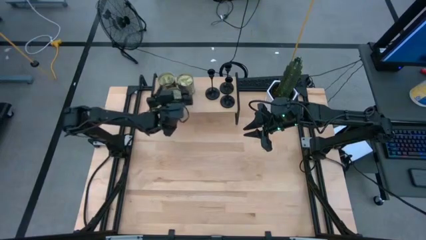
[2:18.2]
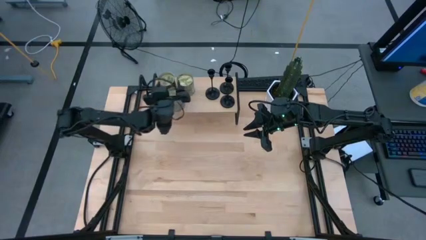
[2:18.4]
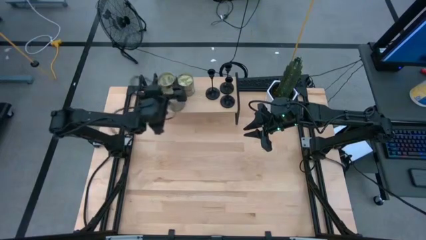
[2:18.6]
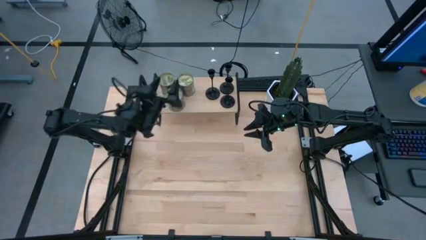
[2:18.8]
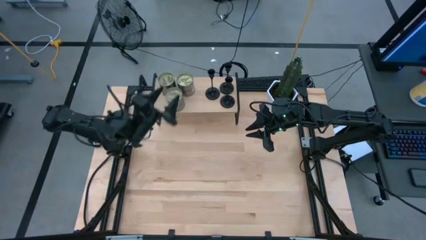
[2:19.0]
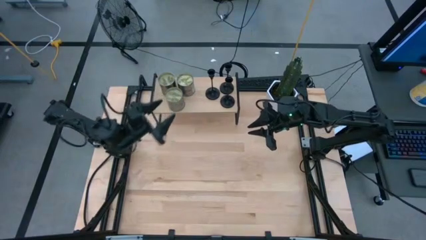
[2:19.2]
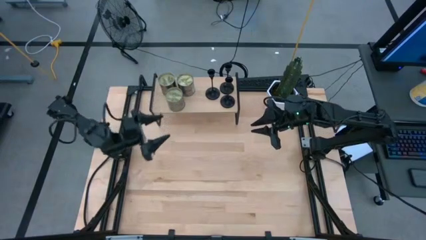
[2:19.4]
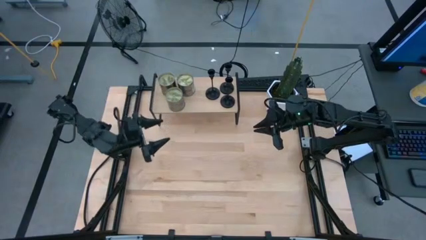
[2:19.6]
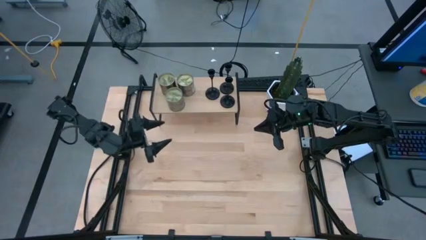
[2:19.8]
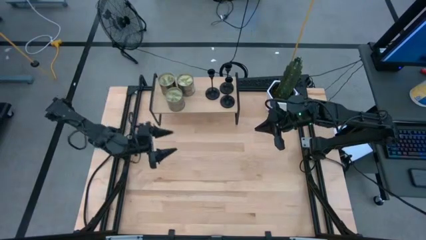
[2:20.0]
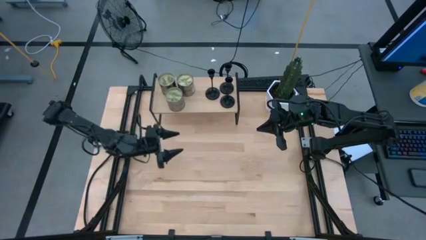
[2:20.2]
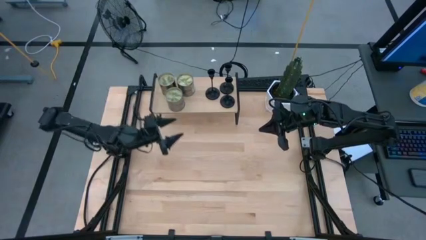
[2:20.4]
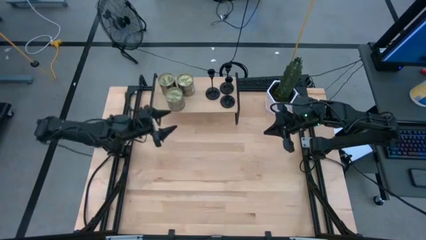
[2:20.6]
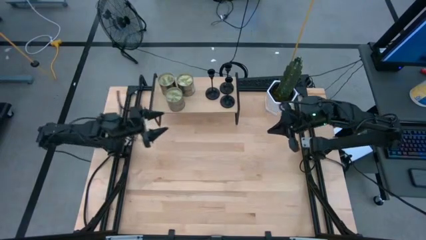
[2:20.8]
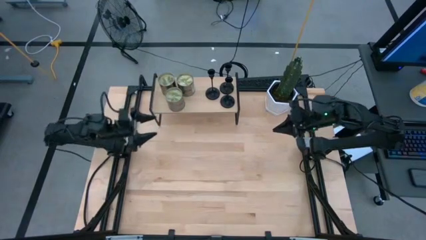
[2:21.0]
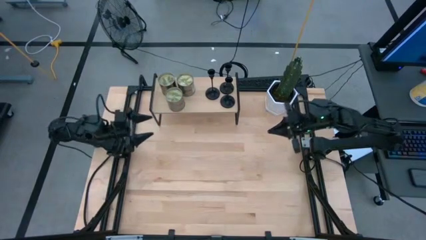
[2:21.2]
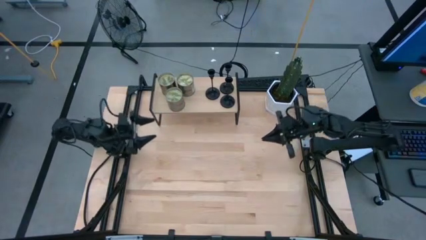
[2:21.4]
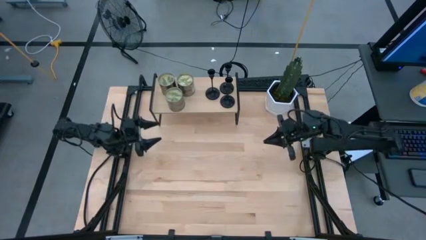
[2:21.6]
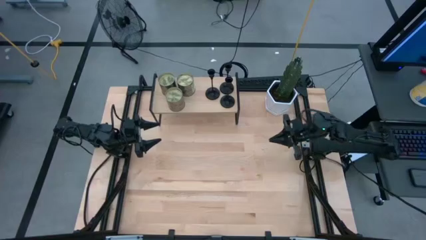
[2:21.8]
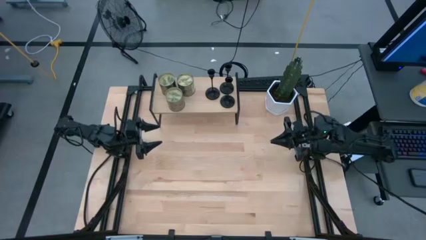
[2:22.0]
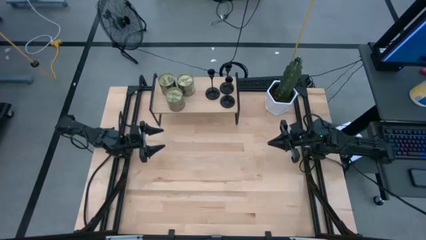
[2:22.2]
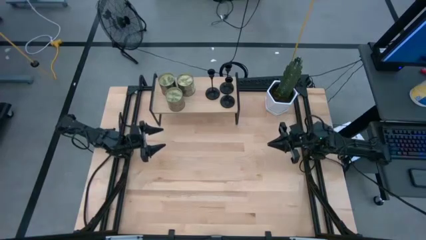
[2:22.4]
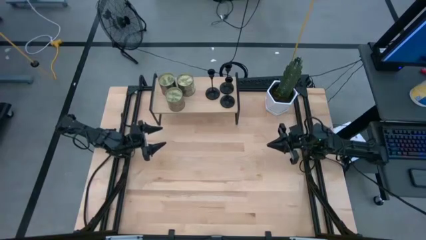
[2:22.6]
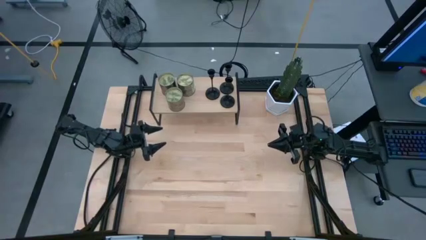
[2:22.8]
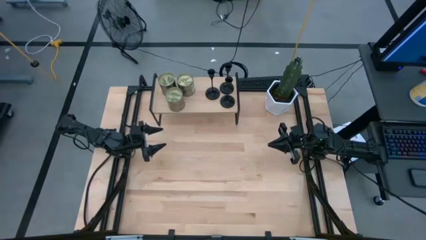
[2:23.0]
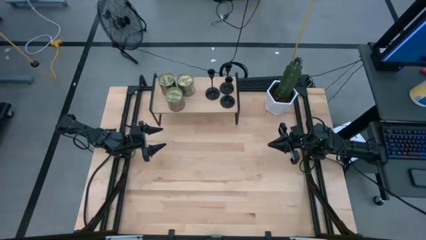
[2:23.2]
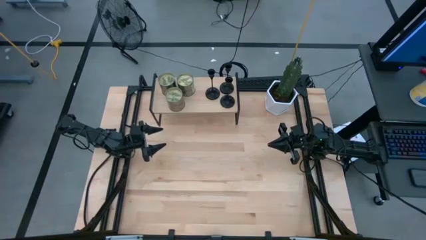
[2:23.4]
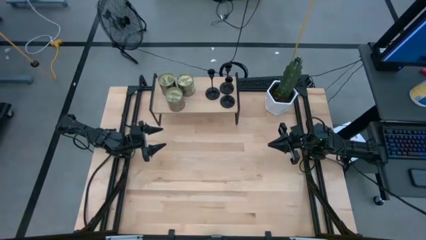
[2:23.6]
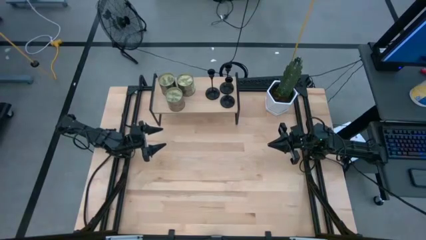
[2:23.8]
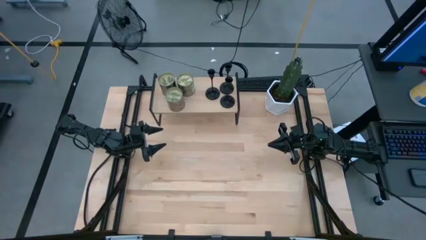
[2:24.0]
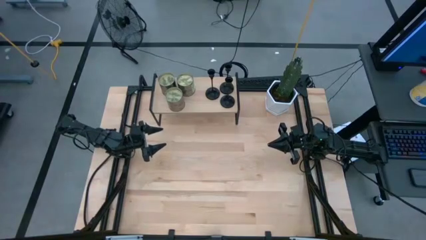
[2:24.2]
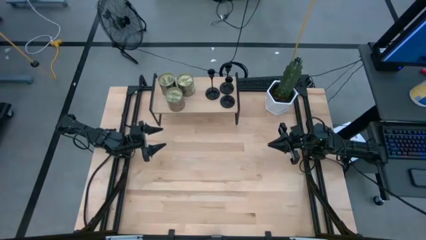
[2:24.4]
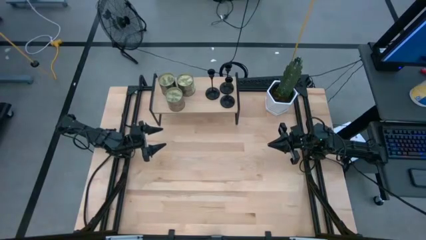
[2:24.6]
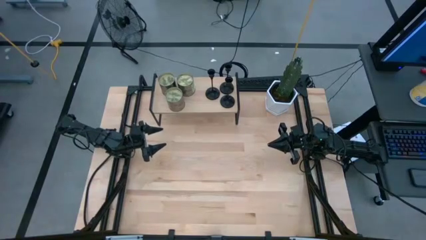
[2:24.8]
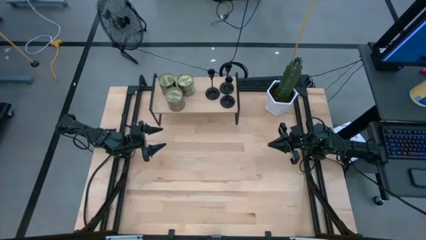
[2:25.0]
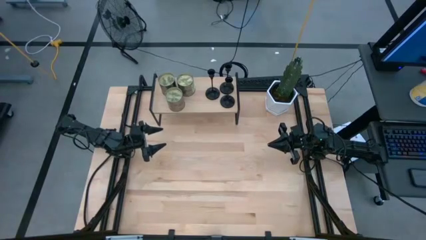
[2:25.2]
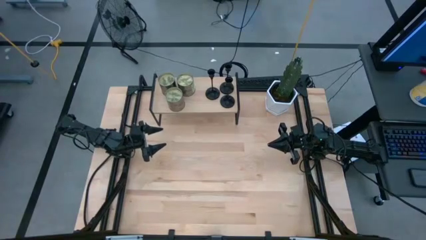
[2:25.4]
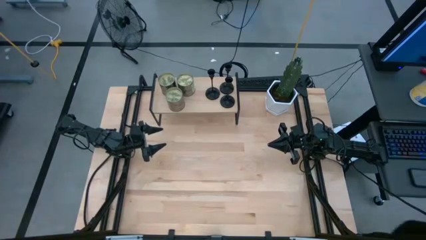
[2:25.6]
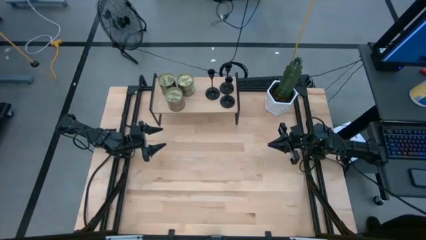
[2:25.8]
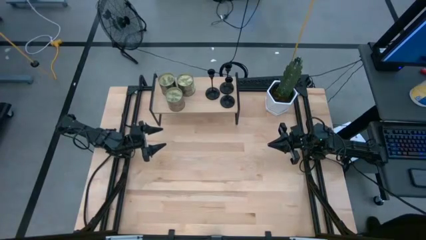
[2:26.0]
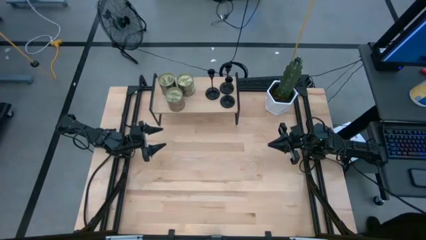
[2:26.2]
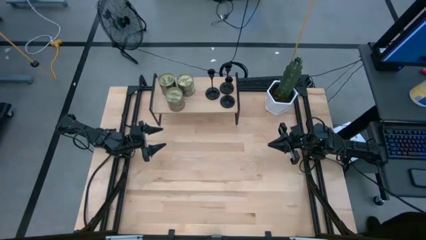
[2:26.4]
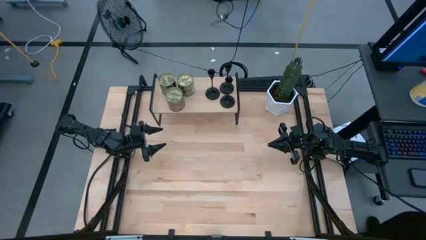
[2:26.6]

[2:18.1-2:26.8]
Task: Pick & Place candle stick holders
Return to Home Position

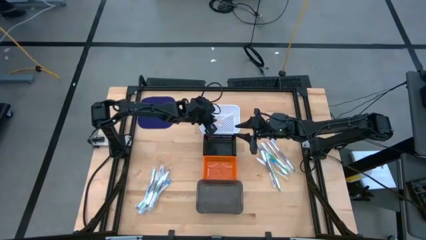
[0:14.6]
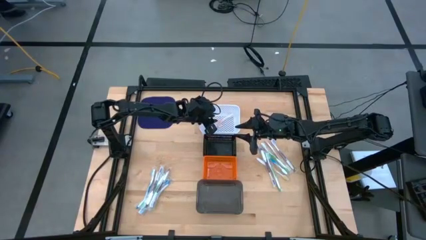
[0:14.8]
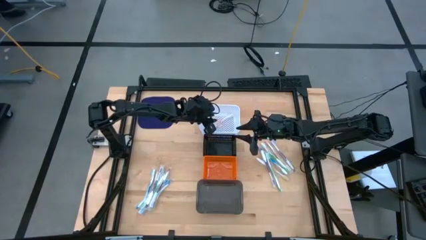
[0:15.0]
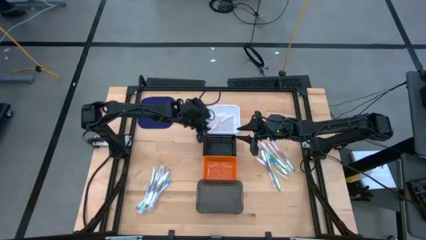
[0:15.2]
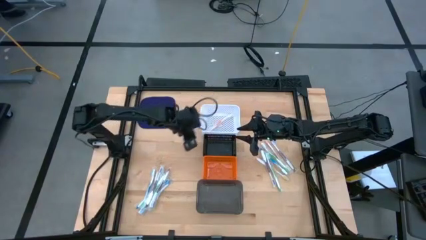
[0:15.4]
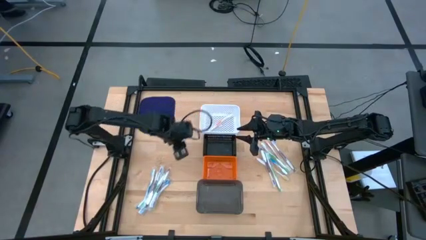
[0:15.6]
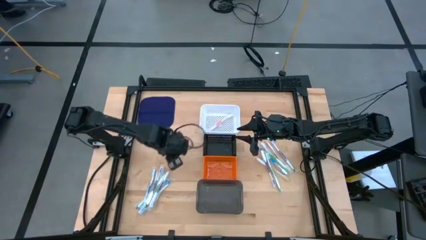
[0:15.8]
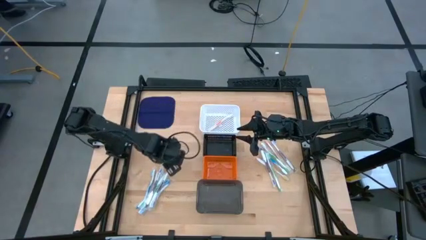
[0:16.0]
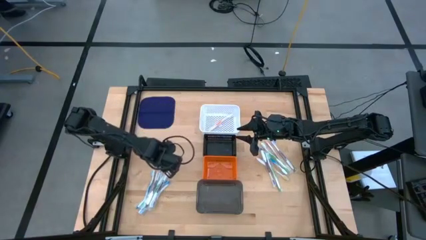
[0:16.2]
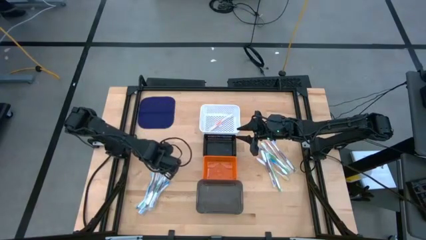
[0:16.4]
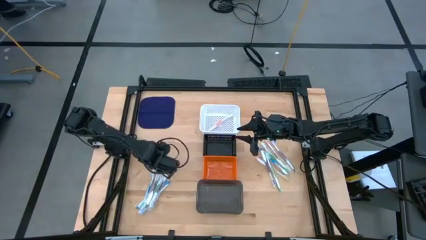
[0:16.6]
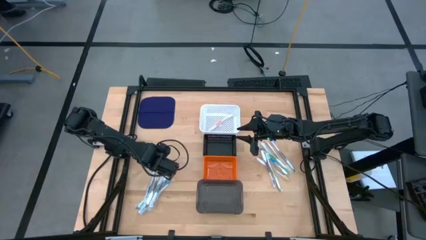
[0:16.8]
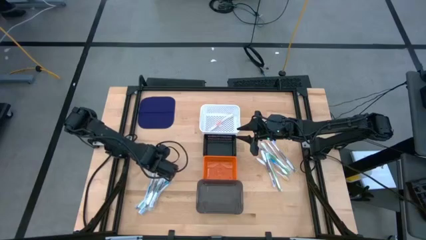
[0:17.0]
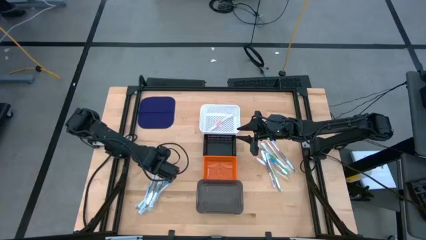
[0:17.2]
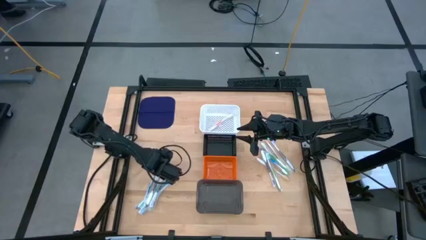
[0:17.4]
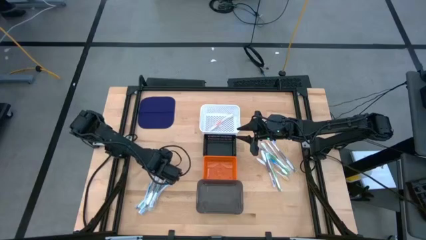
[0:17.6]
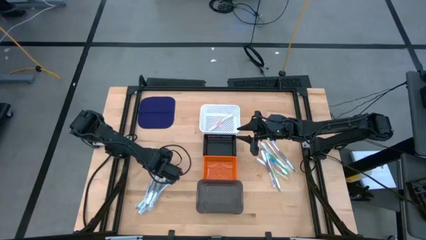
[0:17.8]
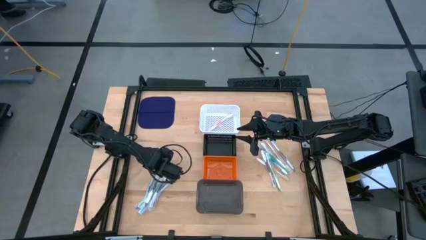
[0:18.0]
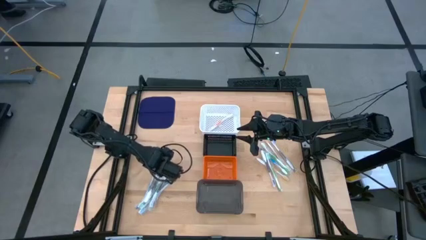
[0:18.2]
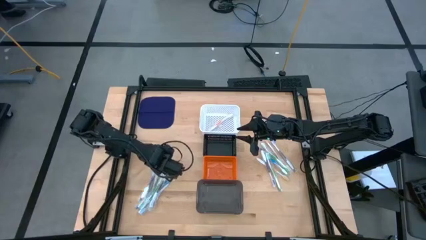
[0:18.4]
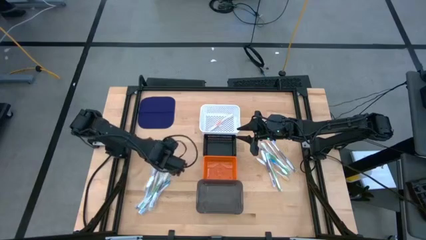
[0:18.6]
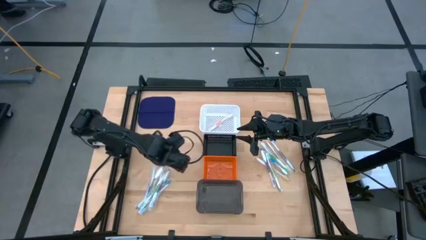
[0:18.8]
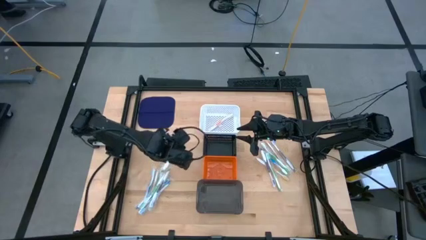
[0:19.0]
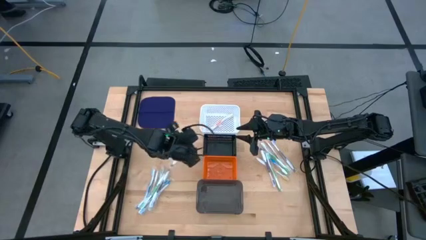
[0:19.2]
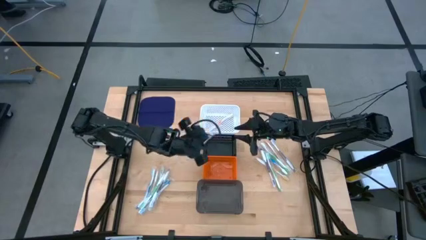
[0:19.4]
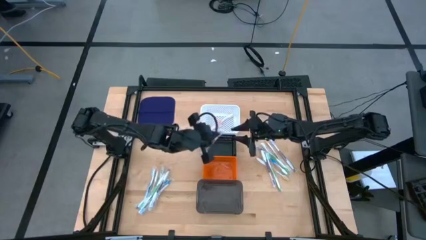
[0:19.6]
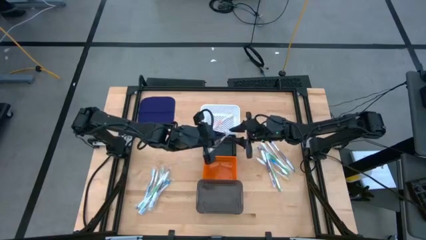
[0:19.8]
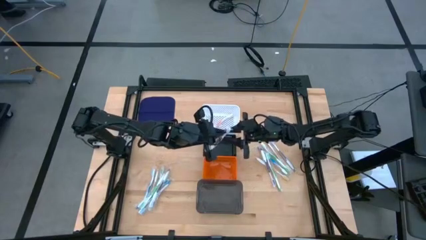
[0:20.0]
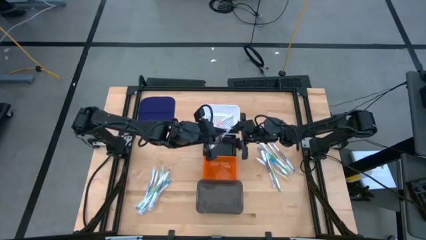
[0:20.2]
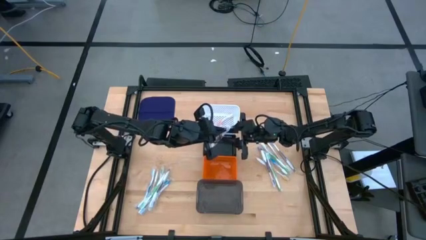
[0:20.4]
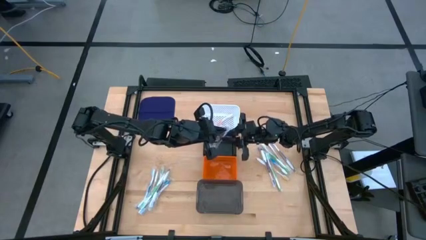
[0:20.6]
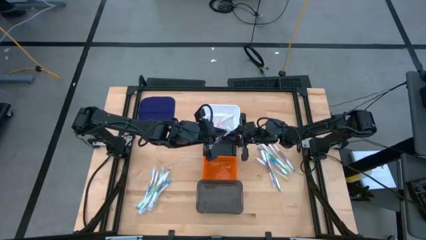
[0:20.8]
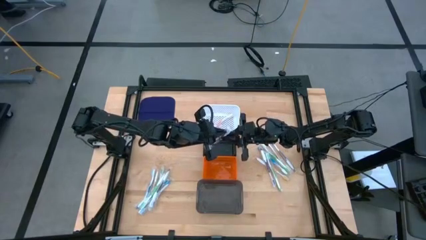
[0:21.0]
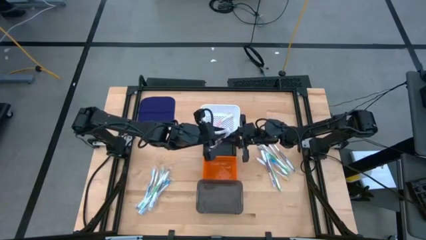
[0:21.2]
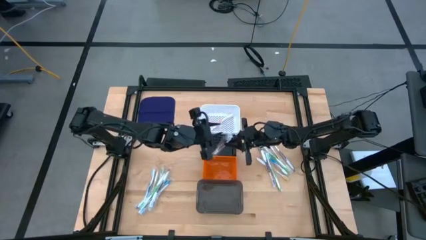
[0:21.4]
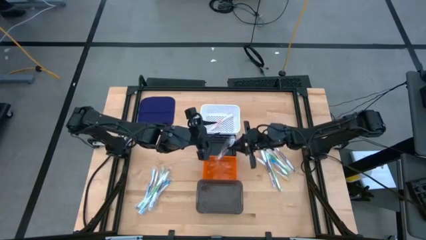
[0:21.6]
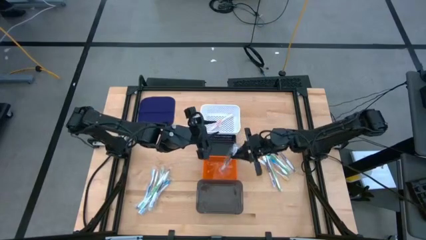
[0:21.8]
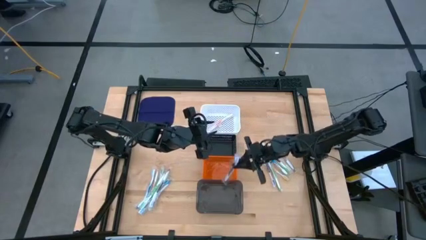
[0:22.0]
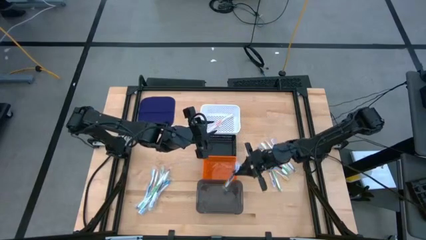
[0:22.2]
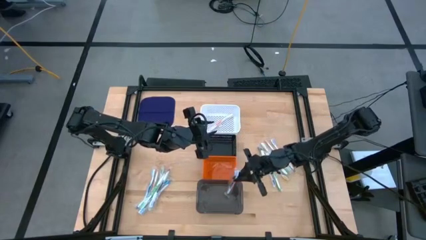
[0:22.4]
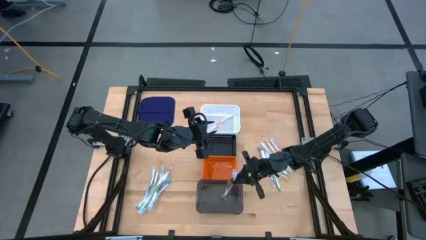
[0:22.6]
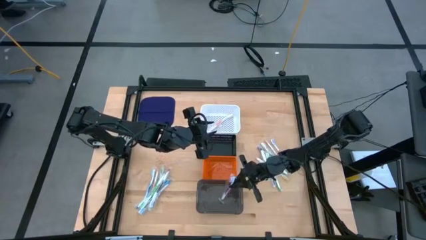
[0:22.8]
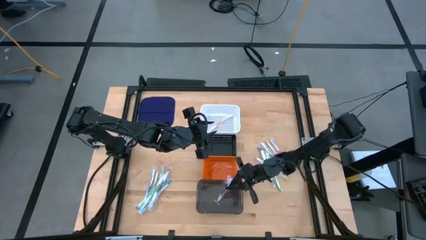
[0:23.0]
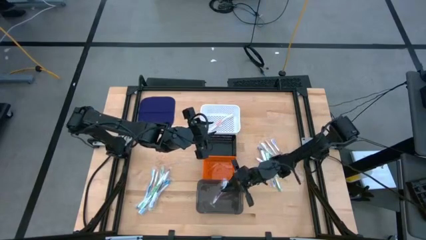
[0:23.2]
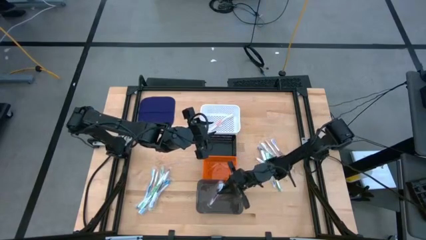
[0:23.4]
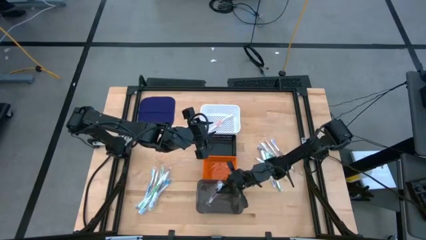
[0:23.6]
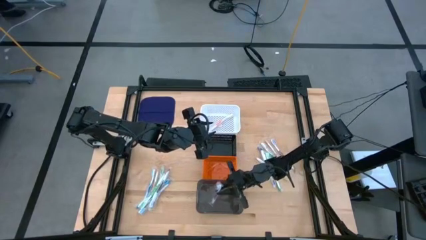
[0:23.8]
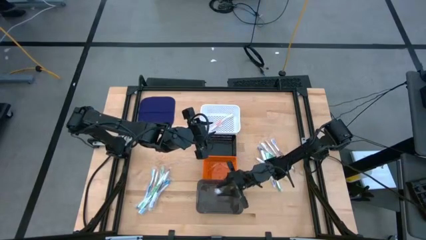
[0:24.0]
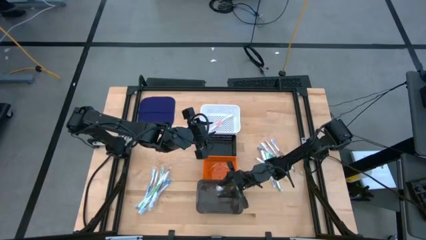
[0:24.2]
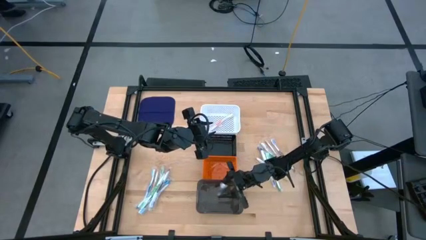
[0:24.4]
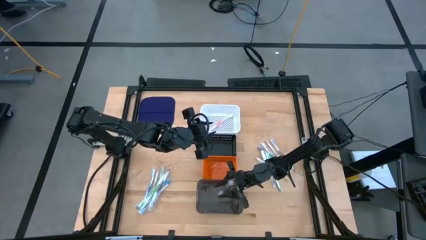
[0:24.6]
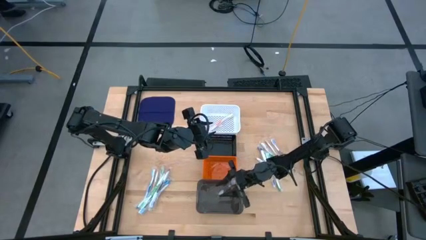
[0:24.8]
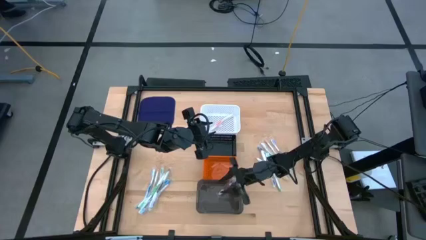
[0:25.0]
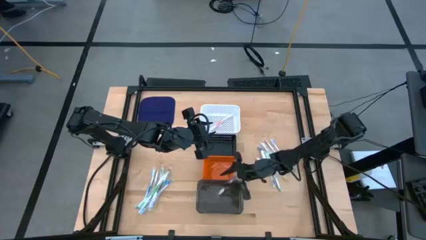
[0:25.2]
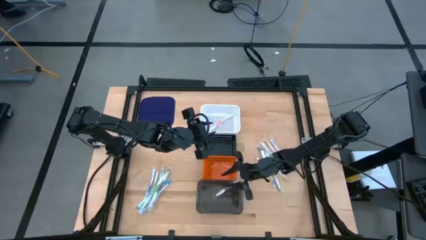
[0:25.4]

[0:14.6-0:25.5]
Task: Pick & Place Toothbrushes
Put the purple toothbrush into the black bin
